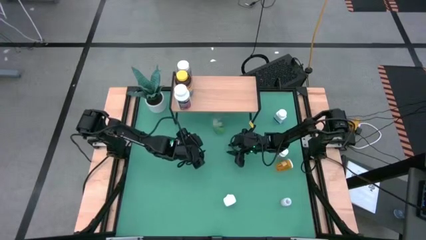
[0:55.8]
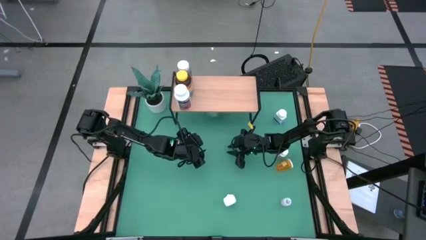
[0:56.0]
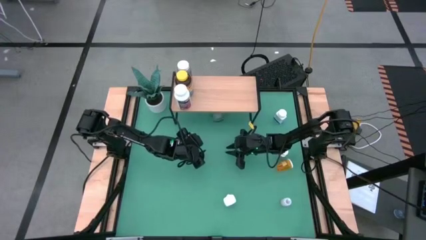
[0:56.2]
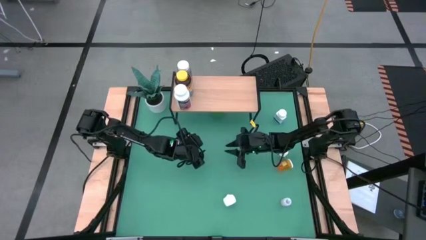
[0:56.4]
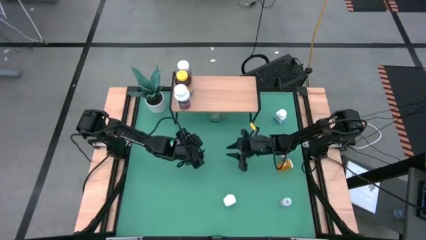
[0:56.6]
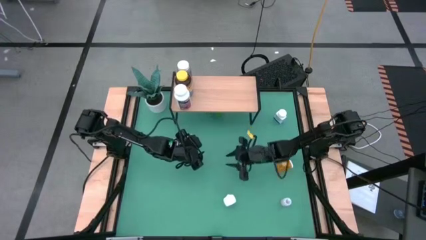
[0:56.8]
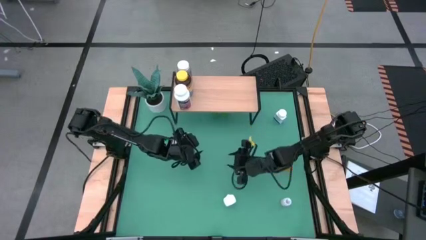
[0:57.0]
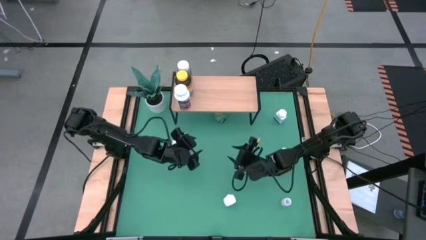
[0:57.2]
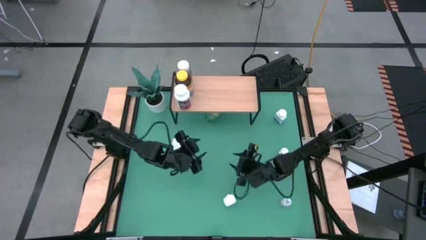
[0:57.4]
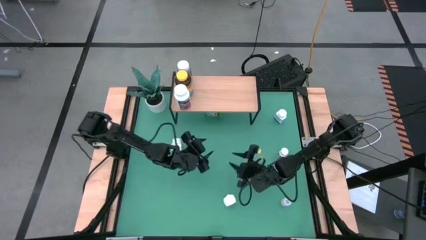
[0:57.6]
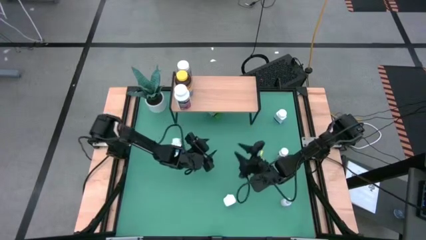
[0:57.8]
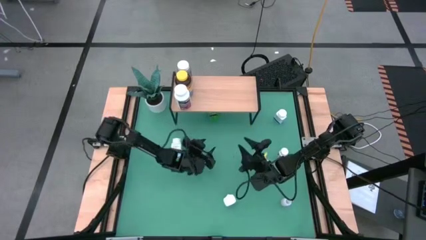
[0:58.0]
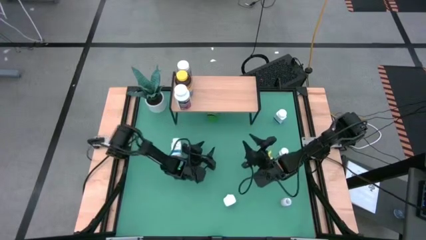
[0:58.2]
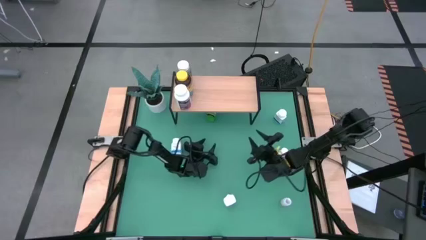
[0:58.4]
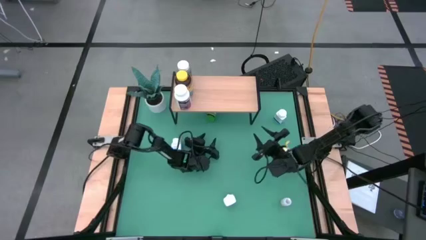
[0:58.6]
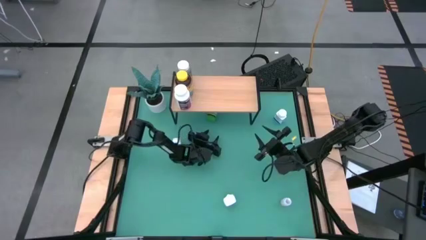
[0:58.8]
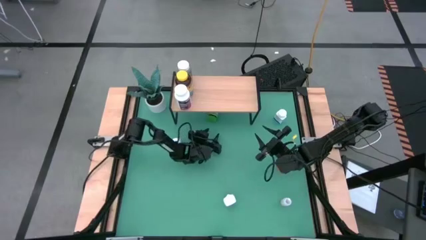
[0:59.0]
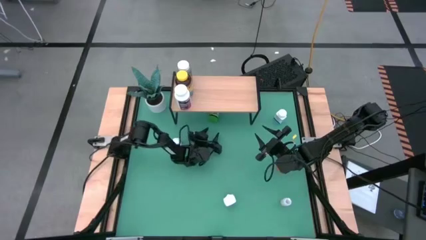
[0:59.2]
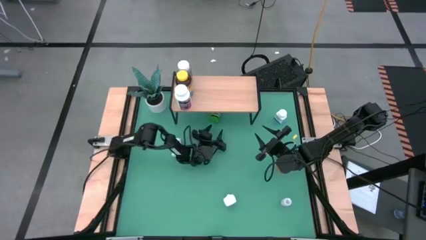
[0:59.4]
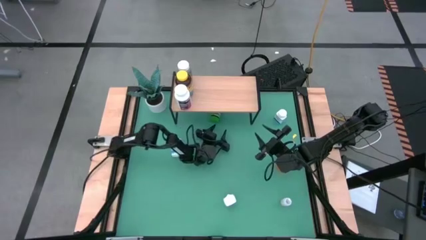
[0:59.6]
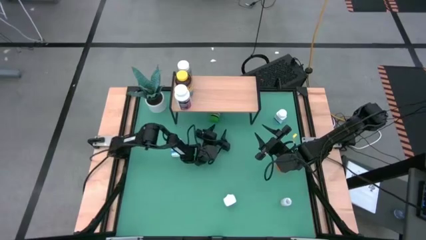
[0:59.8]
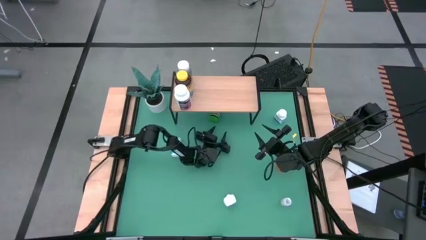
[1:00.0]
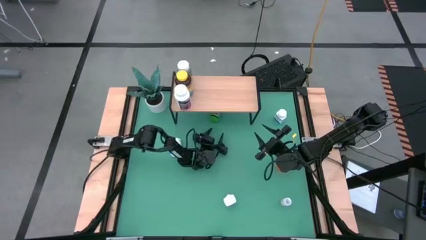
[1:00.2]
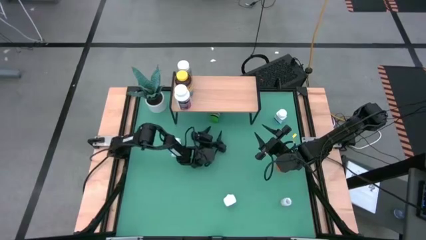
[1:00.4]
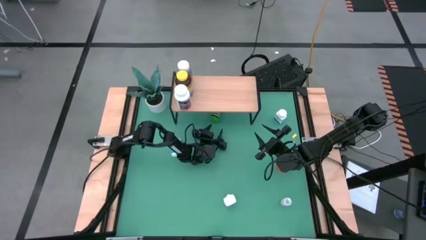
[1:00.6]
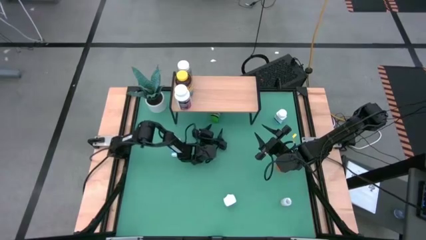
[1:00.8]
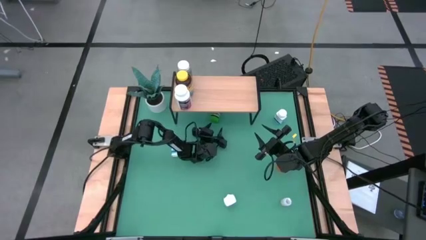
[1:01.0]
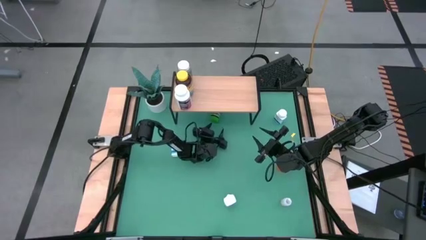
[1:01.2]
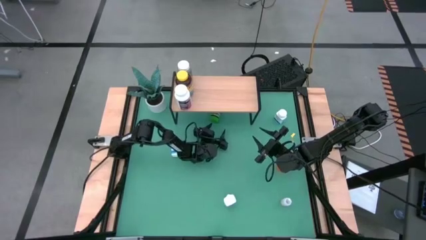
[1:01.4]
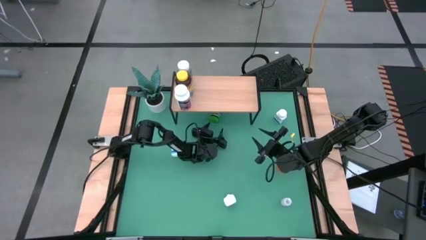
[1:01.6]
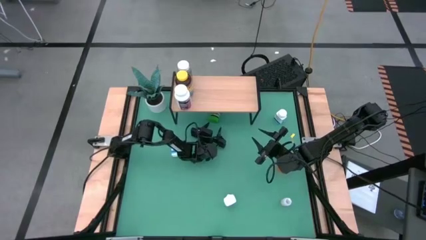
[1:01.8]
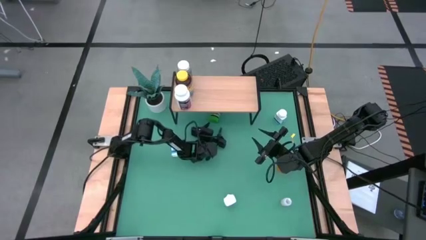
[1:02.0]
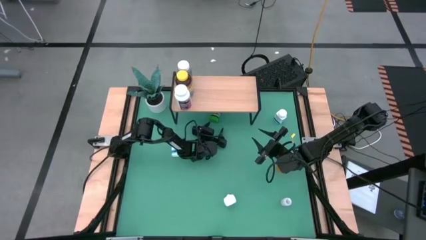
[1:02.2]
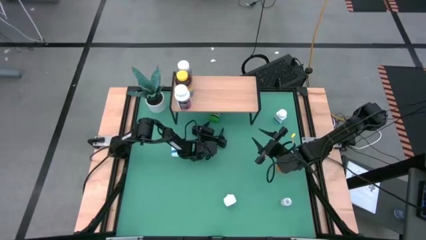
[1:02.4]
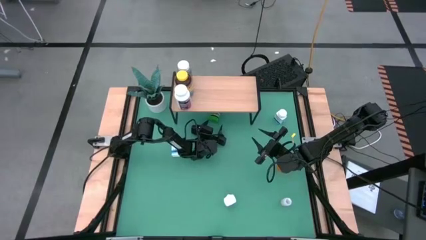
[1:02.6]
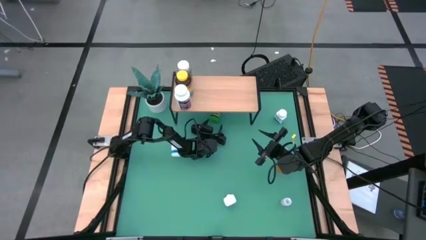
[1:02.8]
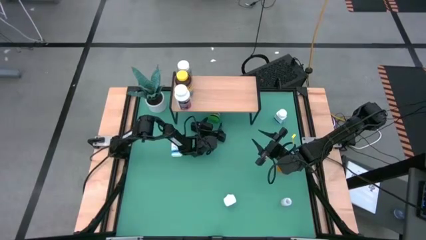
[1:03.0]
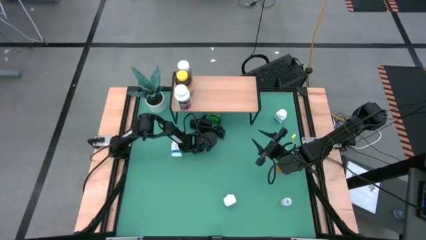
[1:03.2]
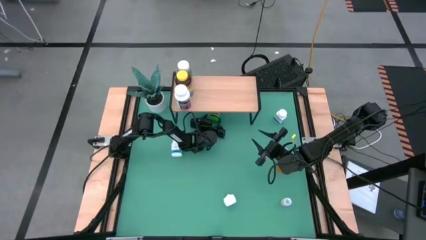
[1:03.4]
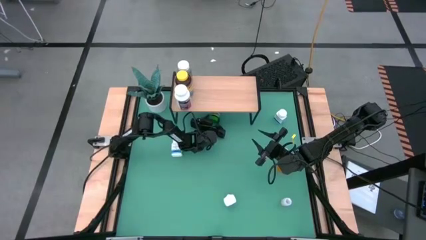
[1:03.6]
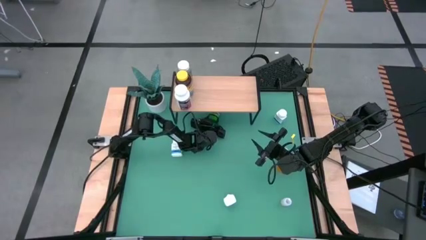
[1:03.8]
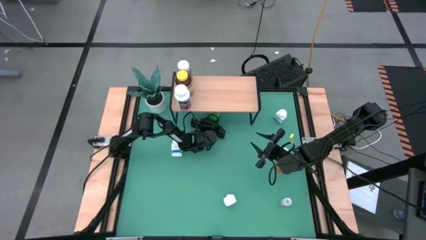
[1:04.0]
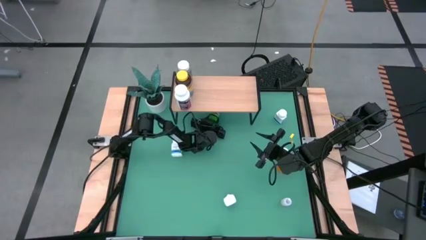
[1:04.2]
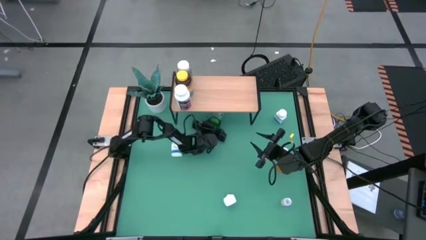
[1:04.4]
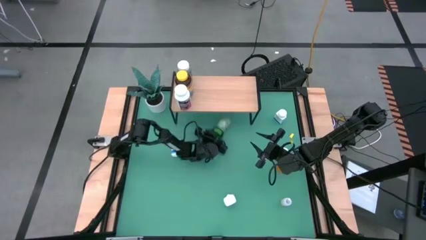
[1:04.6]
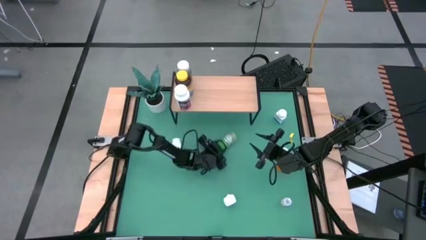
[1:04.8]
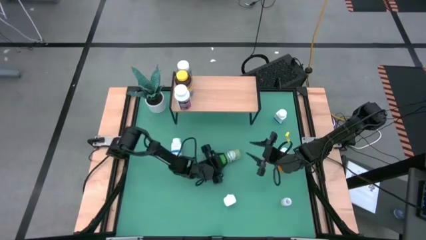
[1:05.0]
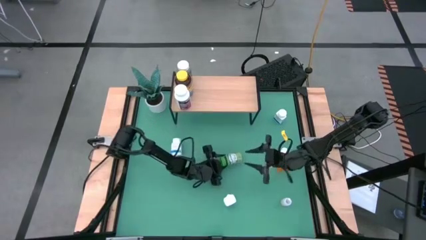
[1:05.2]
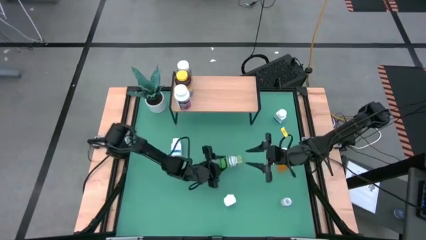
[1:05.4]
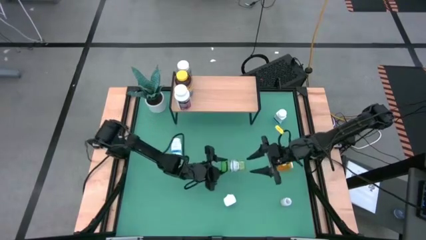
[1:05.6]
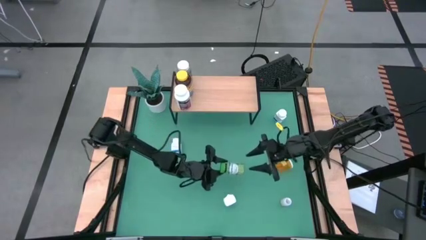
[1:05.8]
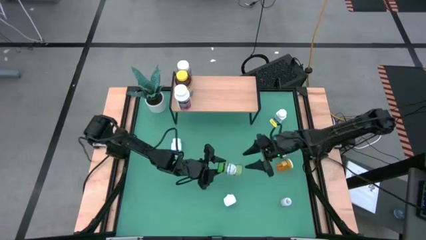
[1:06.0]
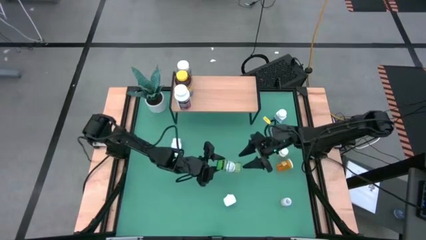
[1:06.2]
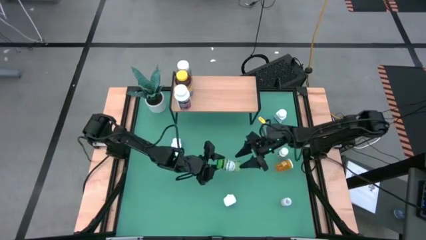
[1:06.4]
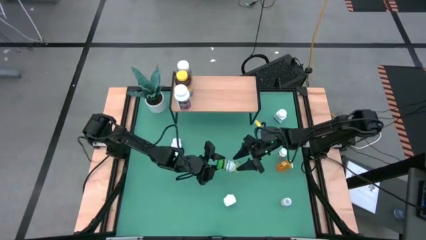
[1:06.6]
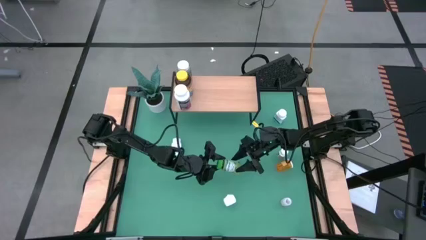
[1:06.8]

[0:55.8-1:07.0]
Task: Pick and place medicine bottles onto shelf by color
Put the light green pill bottle on the shelf
